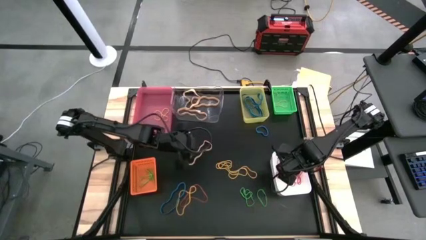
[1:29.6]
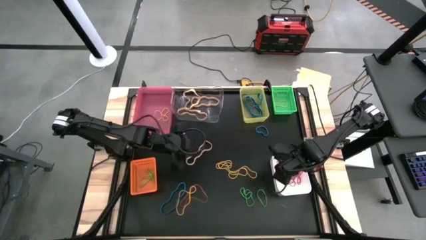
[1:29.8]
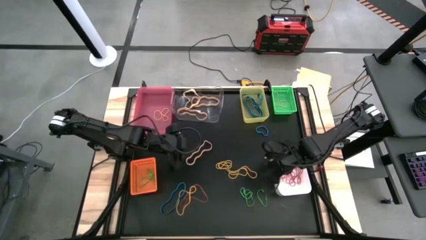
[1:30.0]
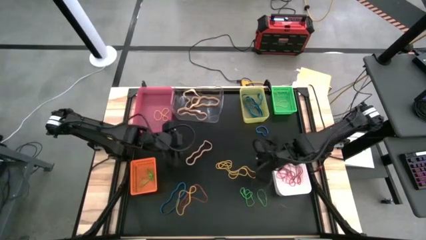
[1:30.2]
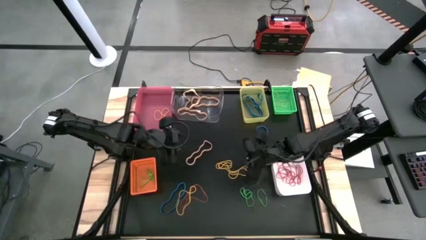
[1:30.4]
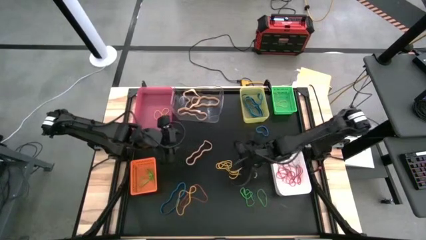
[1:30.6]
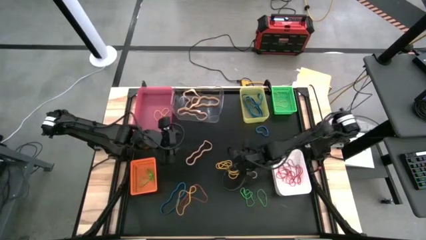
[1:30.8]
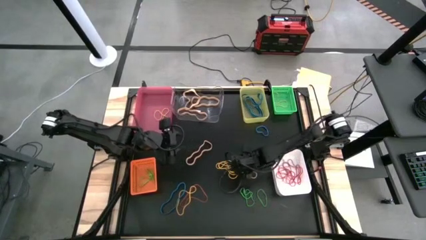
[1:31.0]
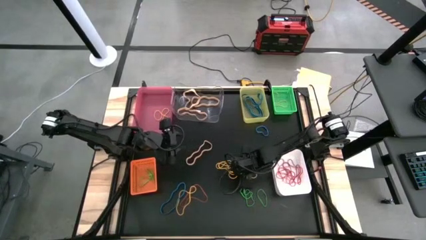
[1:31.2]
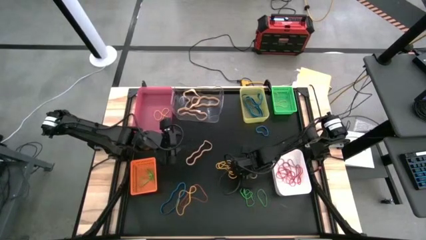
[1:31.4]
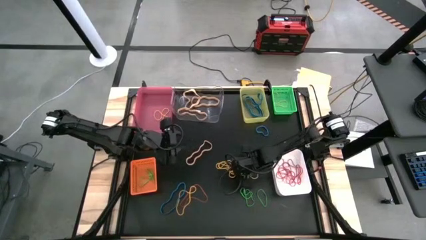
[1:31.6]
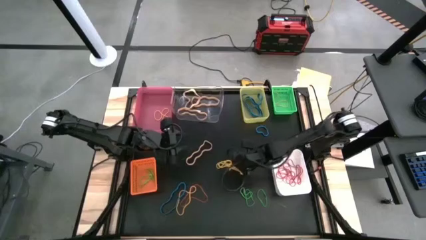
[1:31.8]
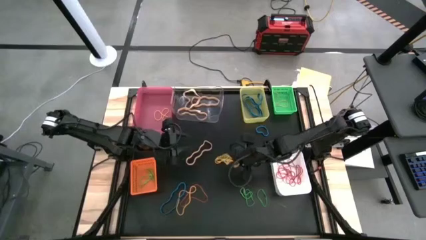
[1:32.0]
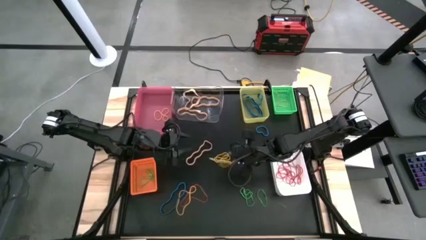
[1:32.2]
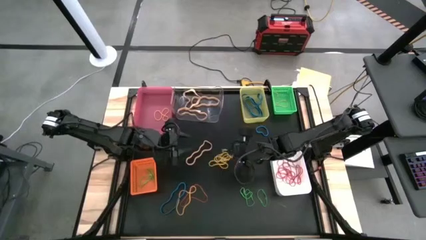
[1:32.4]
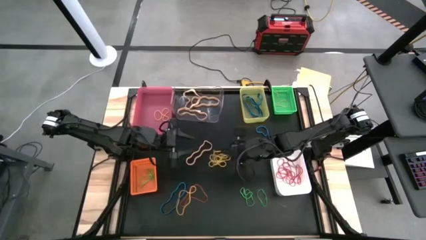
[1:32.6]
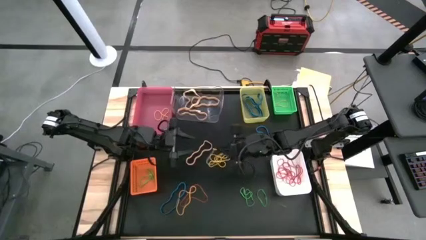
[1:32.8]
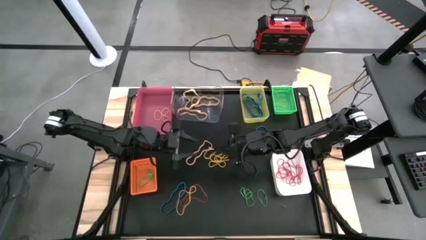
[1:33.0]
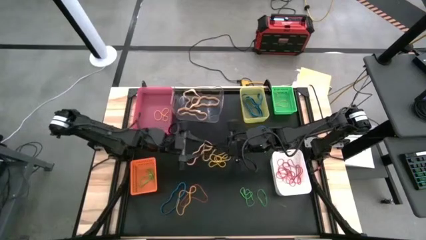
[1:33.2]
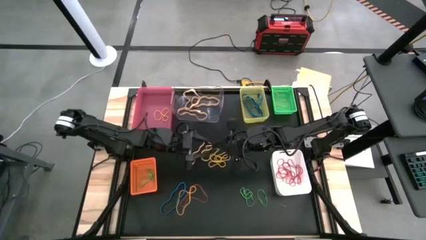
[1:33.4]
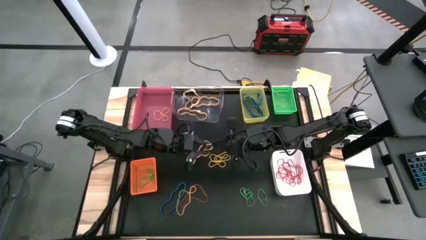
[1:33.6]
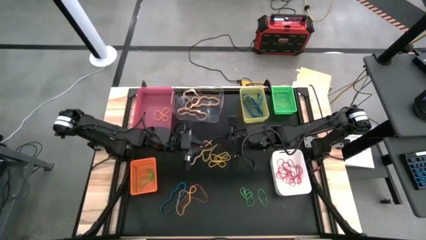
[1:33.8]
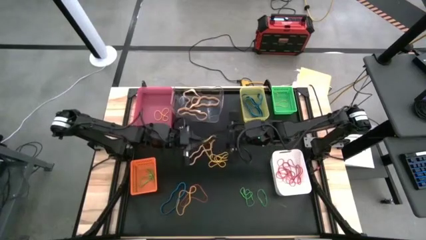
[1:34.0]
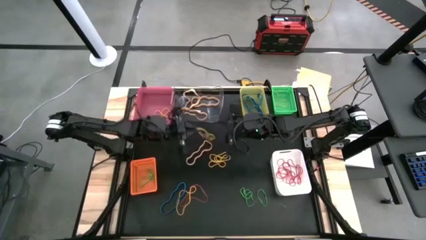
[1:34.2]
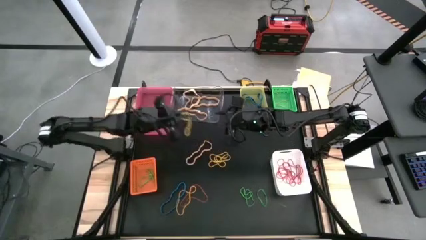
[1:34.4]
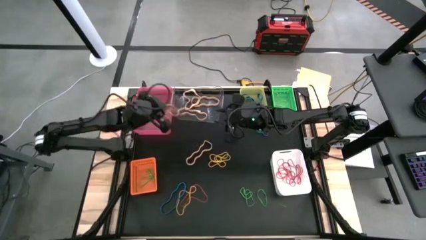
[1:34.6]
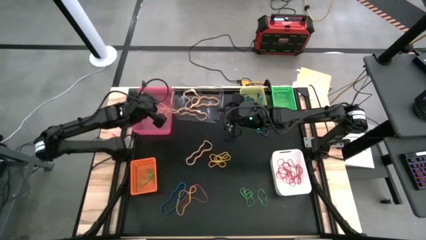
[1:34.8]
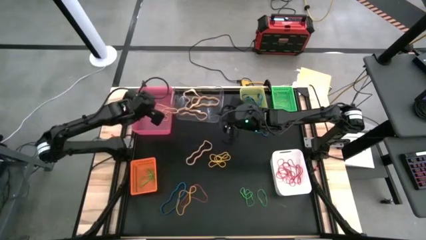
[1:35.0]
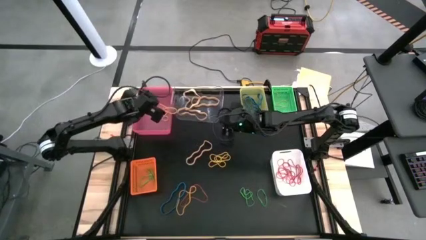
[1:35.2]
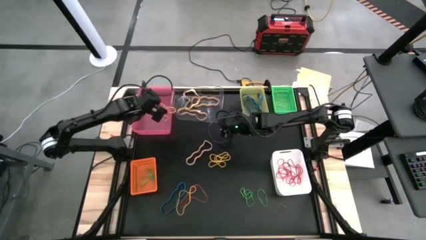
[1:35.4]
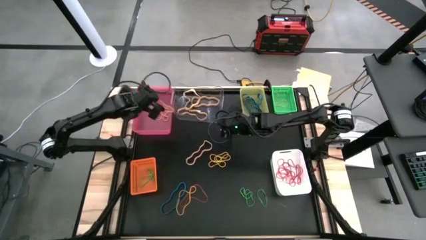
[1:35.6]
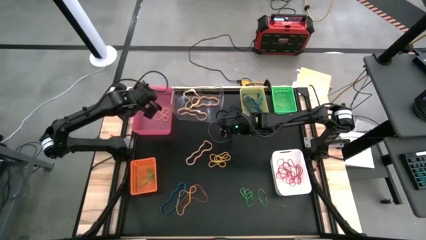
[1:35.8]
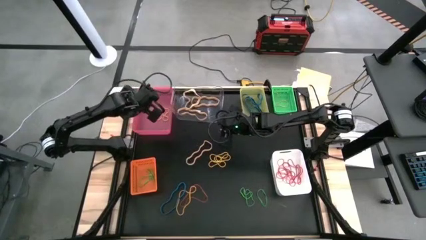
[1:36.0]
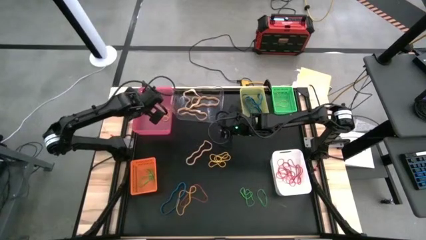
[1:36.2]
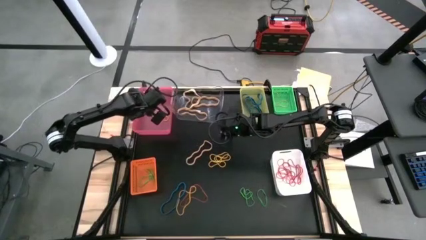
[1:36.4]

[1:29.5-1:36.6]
Task: Sort rubber bands into baskets
Put the yellow rubber band into the pink bin

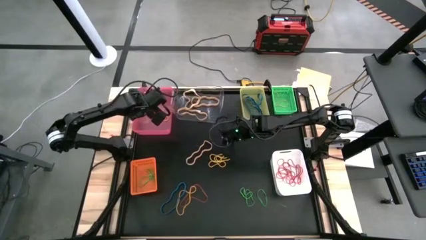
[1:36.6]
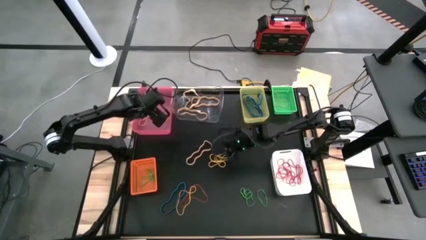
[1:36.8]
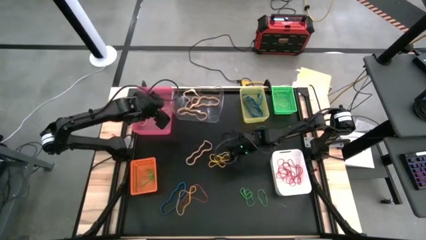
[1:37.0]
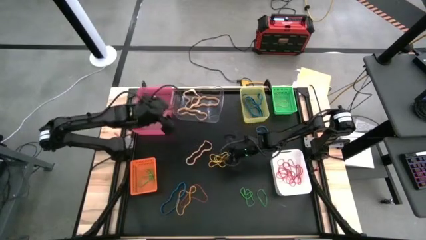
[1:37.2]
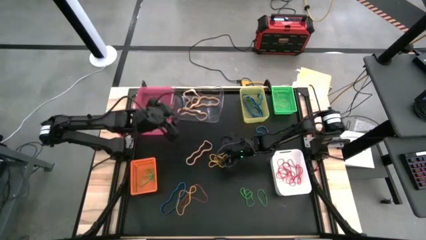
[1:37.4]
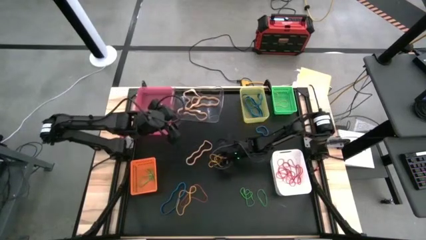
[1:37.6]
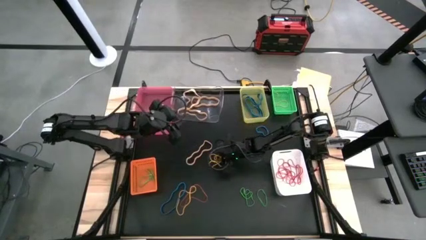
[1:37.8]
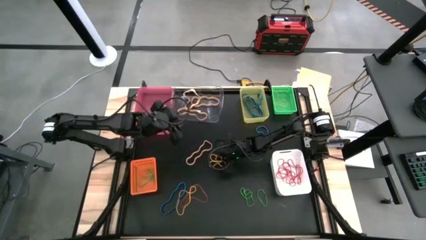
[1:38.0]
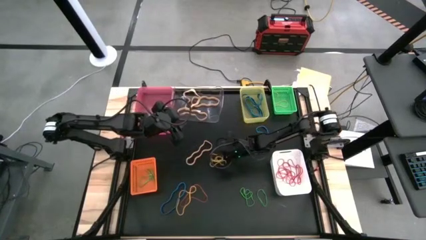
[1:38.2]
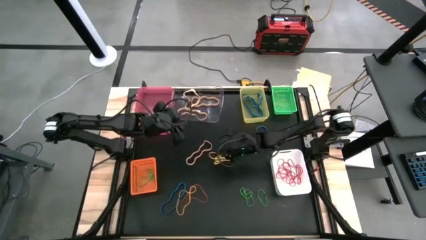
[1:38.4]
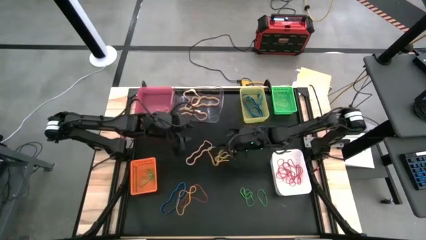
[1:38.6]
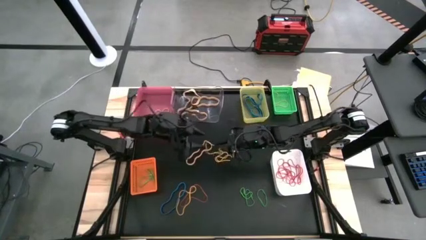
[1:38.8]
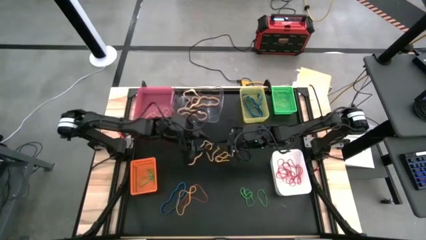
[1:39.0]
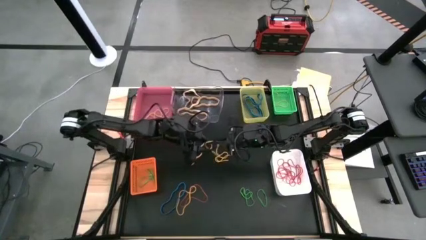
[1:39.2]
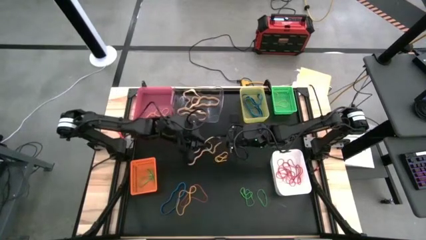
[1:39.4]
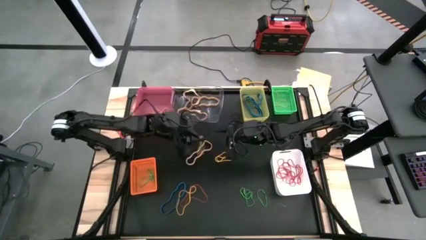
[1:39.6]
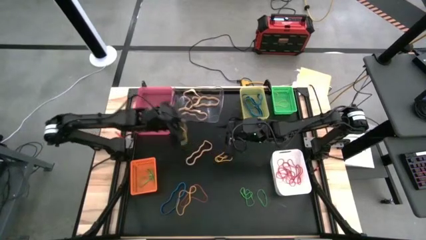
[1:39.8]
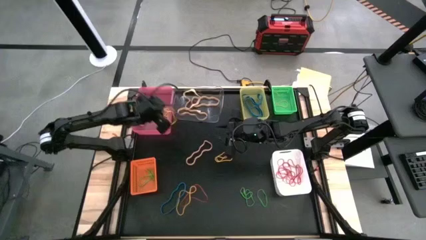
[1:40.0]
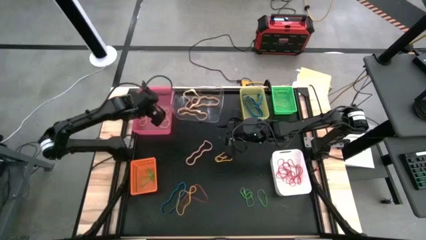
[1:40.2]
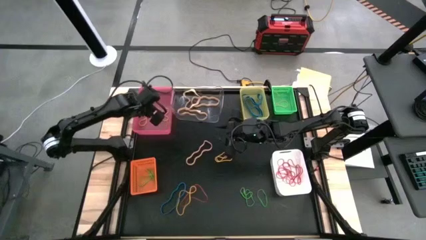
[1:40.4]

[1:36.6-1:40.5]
Put the yellow rubber band into the pink bin

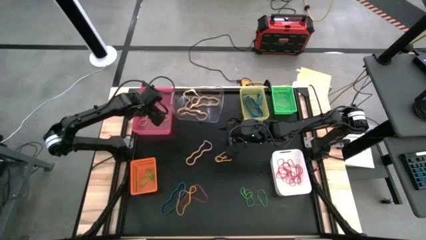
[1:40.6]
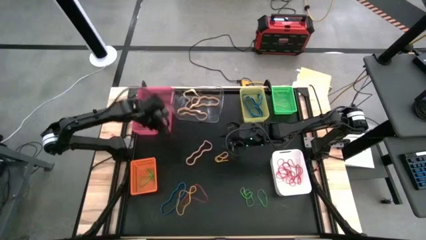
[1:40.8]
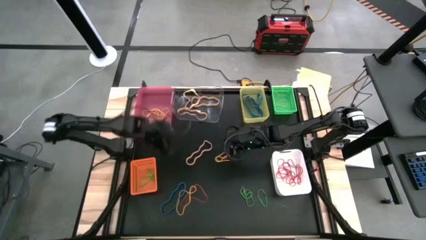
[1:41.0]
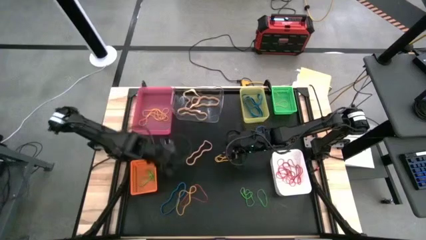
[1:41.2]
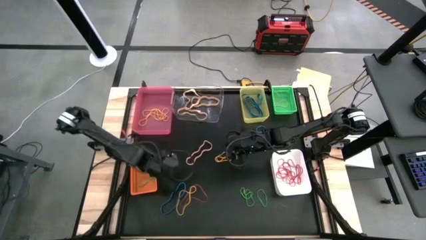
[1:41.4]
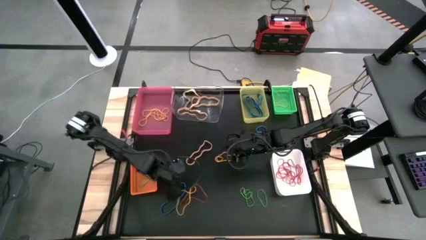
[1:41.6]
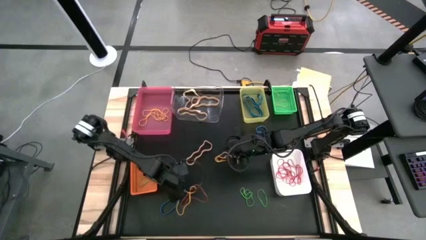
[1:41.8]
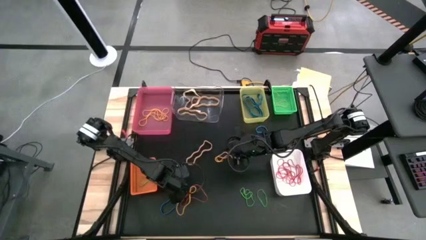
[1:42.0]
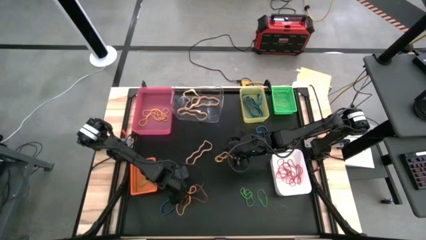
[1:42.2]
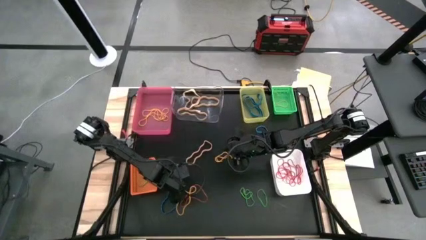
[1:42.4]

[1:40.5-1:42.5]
Put the blue rubber band into the yellow bin

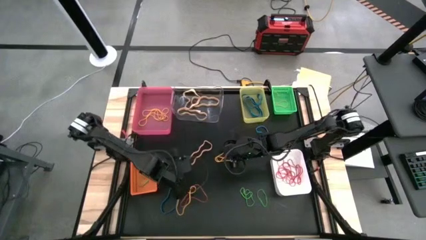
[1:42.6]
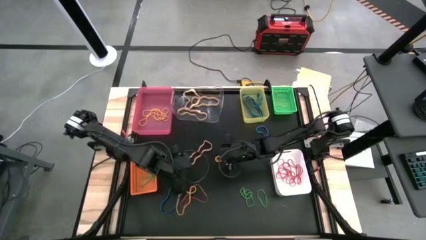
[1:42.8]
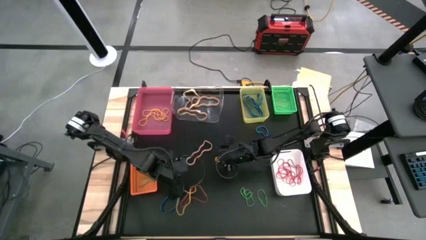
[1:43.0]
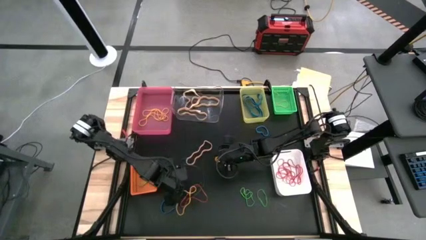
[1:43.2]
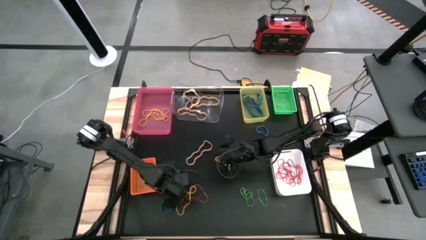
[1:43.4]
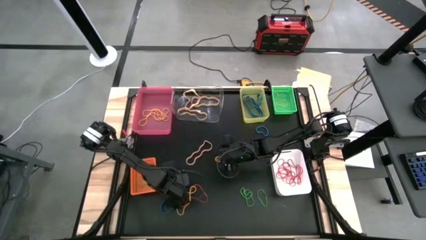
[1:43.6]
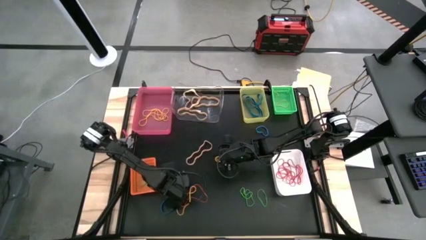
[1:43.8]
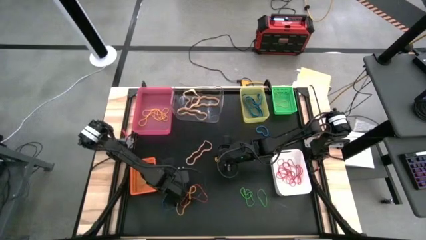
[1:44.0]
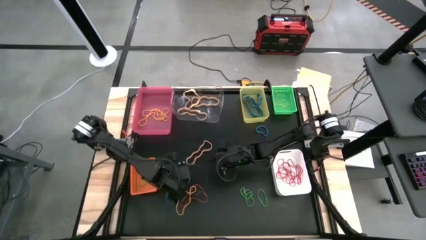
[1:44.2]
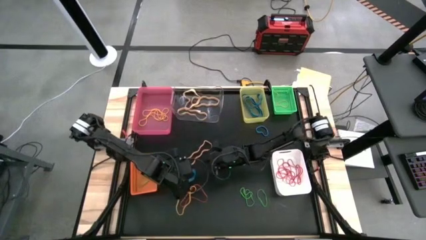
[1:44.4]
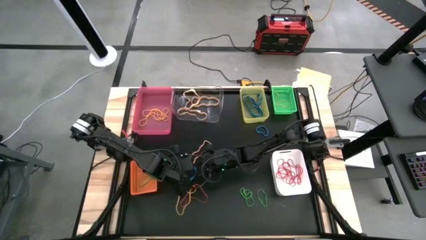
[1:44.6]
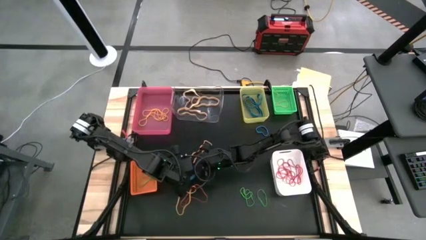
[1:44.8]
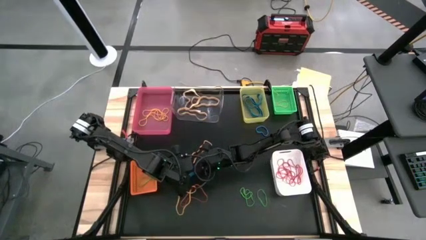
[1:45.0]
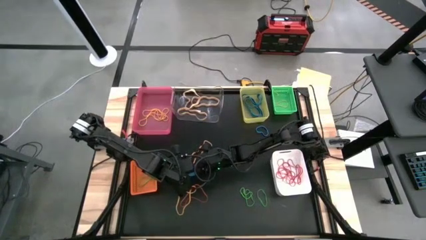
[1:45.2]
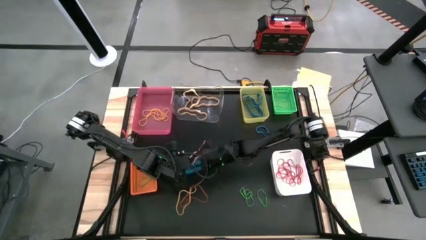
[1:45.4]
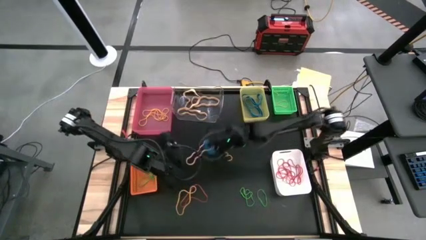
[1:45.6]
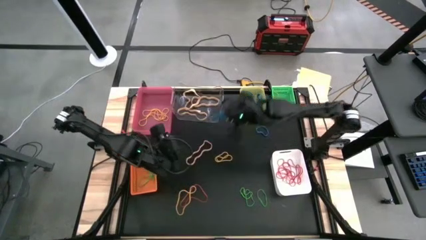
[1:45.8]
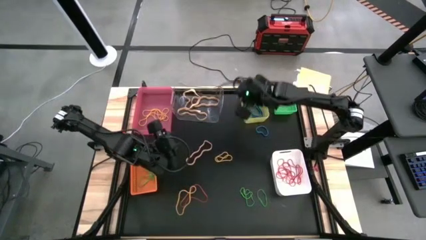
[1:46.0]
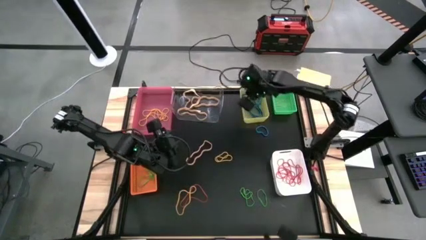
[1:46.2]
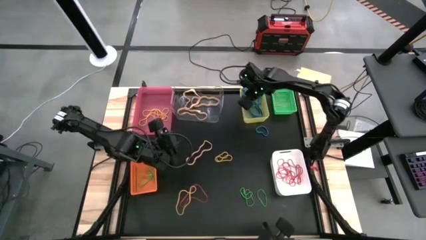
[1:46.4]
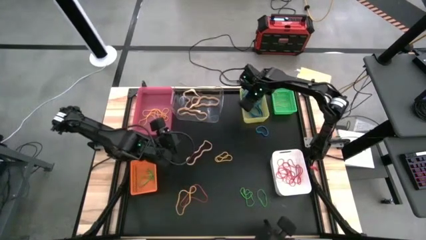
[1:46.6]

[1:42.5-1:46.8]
Put the blue rubber band into the yellow bin
